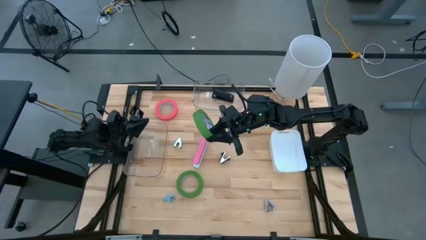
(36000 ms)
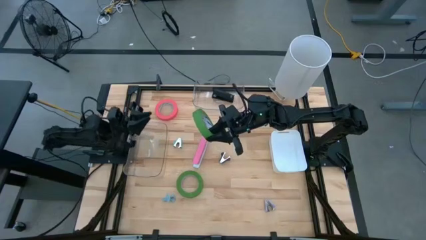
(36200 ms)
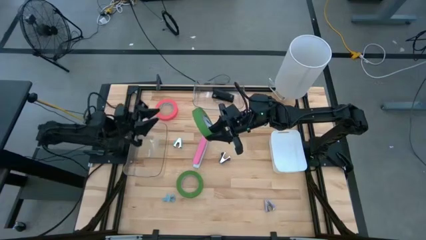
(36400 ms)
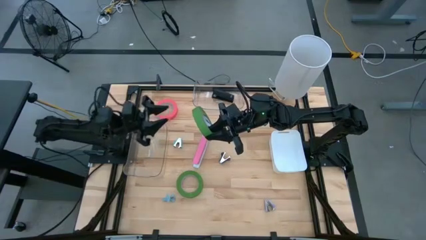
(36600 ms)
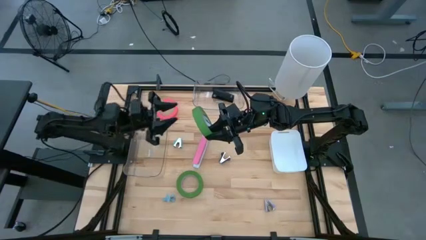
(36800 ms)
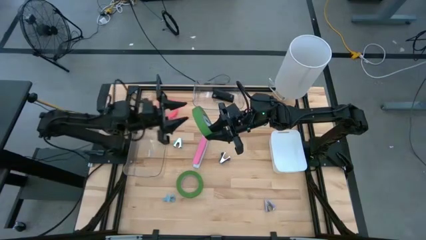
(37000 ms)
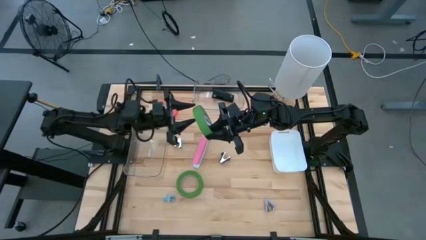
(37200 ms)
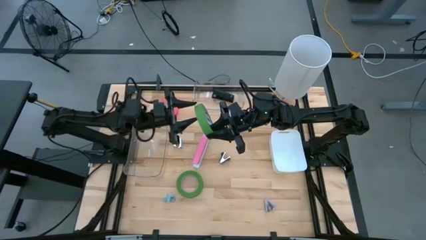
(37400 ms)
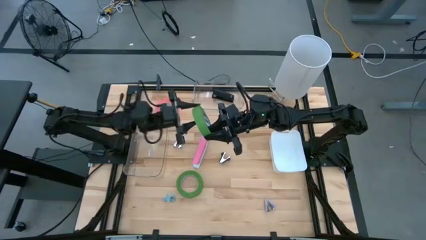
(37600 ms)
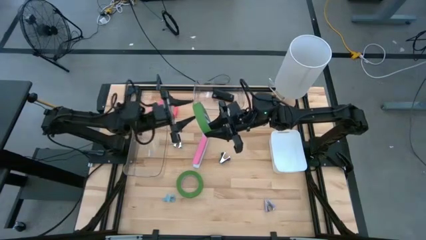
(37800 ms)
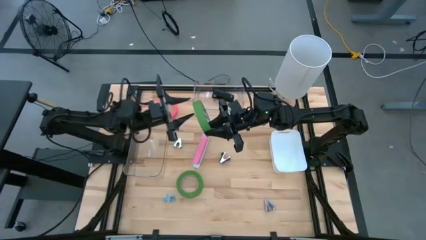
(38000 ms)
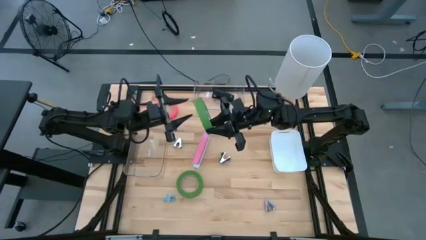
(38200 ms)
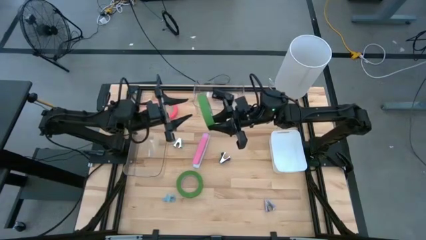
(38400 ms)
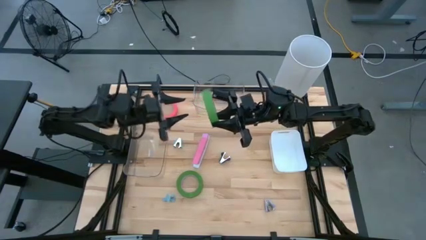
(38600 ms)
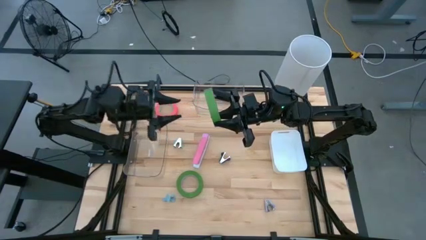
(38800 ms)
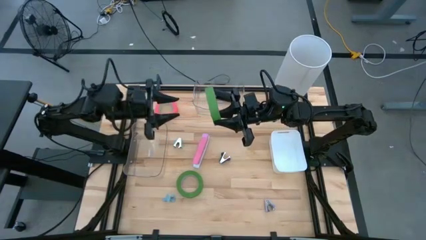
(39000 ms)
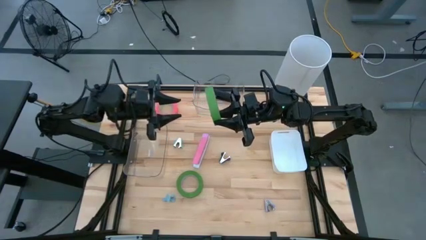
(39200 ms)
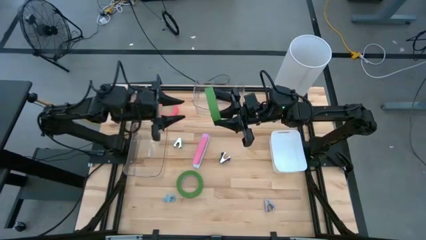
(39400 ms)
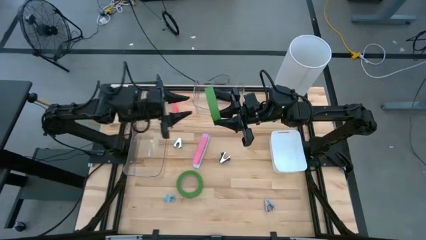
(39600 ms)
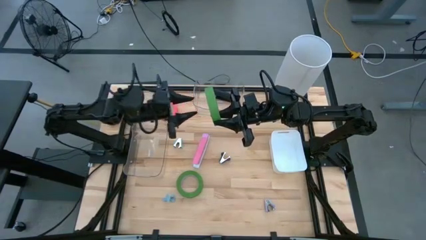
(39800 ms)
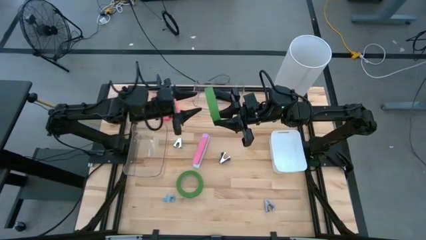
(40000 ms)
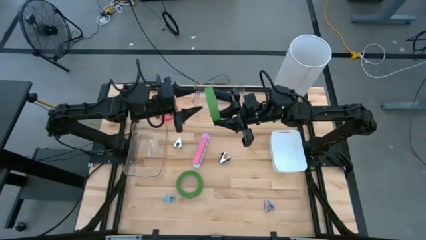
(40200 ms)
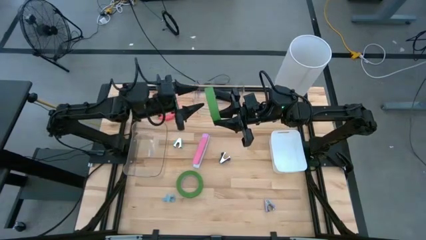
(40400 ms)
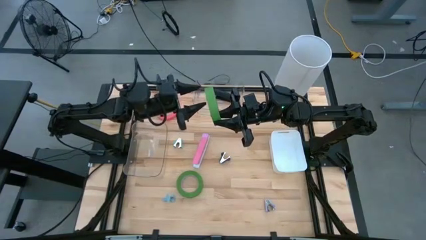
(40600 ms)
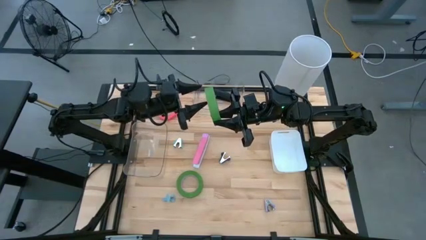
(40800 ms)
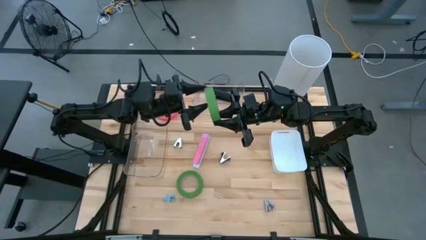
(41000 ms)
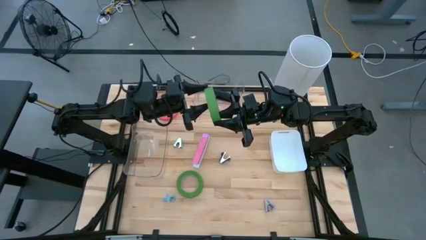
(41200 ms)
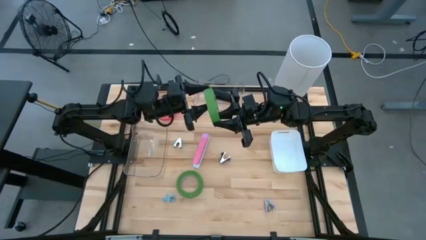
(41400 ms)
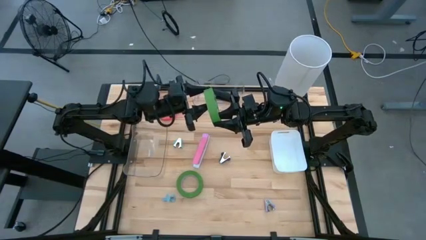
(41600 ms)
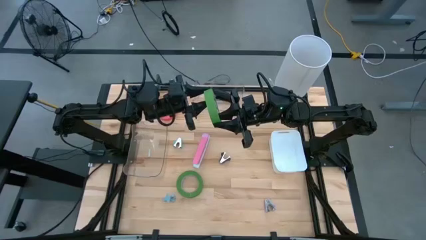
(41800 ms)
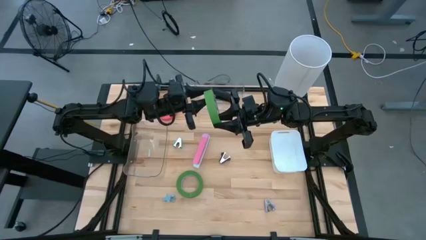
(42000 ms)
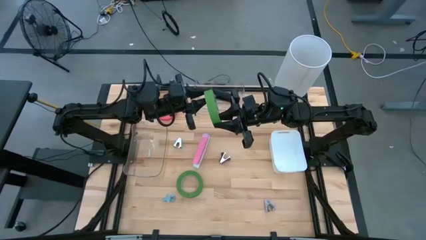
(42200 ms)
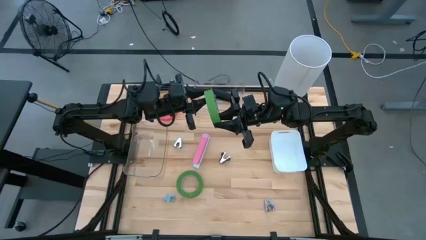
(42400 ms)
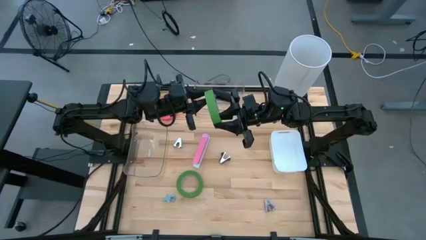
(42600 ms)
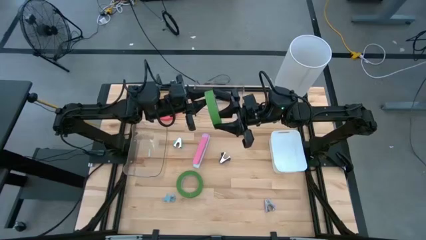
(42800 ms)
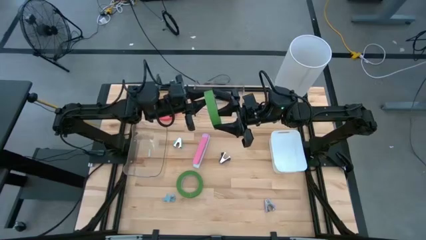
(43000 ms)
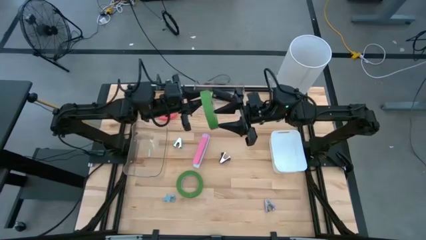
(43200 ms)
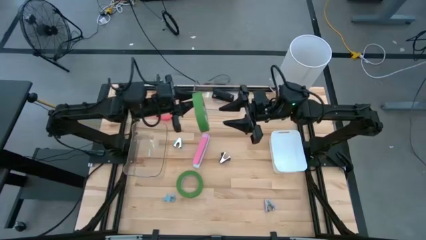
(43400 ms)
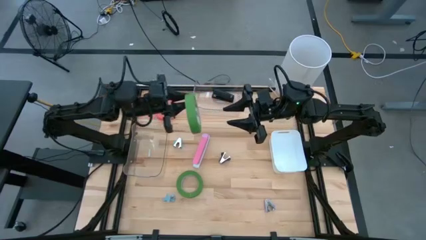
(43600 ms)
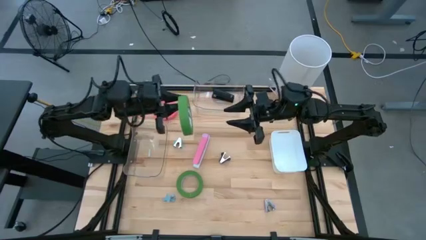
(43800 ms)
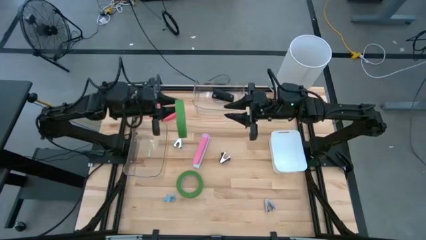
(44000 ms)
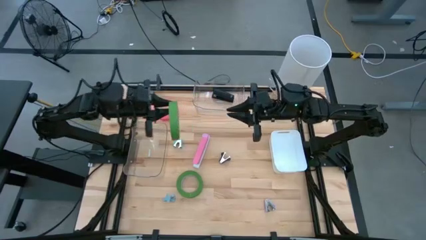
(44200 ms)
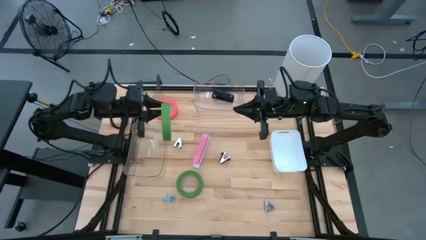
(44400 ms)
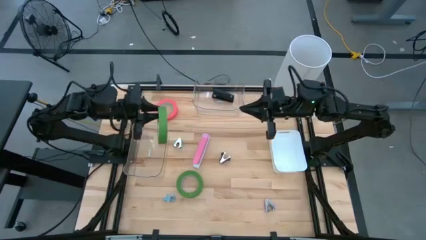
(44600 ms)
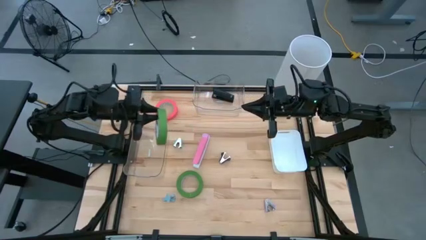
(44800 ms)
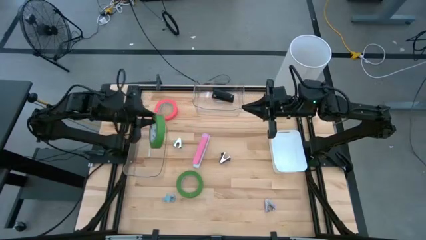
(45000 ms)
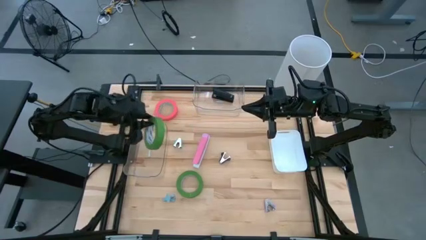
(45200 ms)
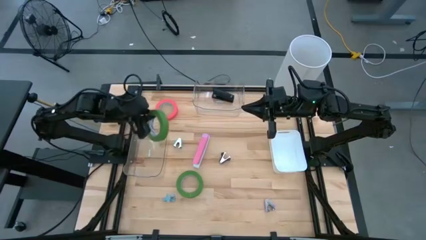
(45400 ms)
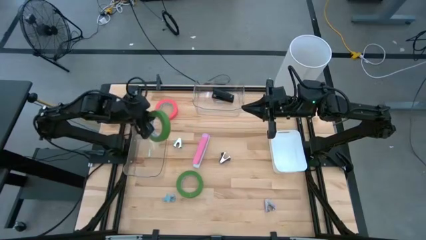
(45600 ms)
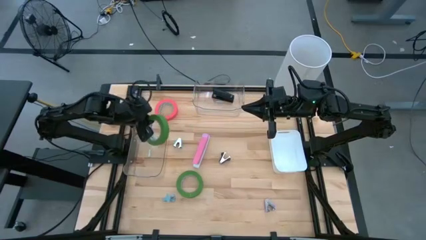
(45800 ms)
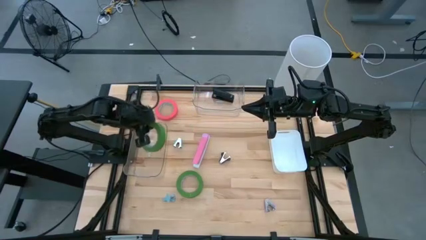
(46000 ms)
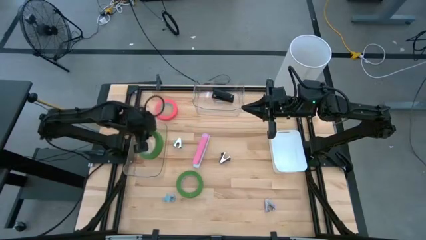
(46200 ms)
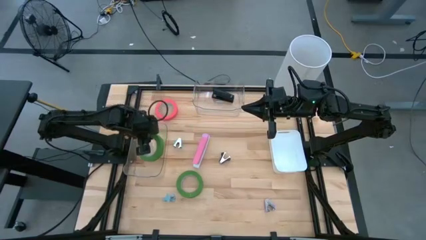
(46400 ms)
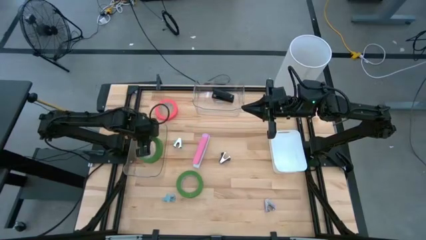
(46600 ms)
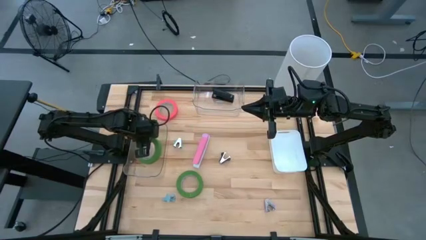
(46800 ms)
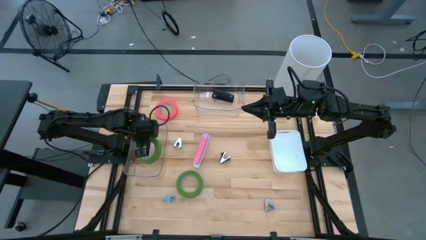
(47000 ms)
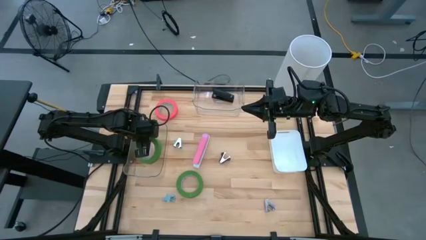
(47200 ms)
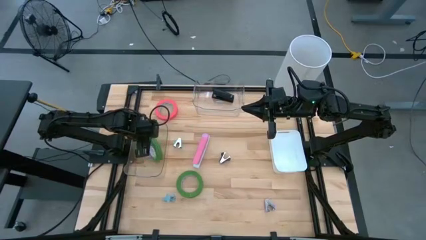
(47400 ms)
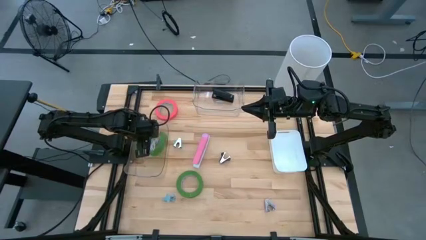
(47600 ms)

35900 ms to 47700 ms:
Task: Pick and place Stapler, Stapler remover, tape
Put the top green tape into the bottom transparent bin

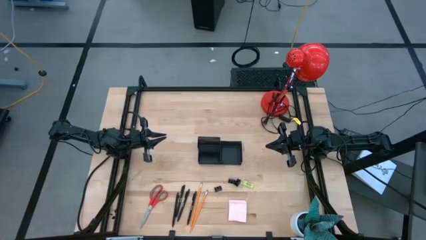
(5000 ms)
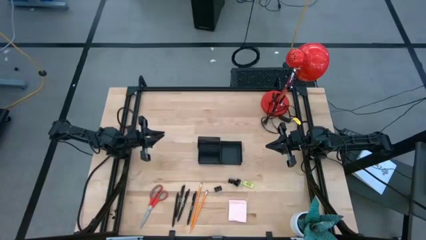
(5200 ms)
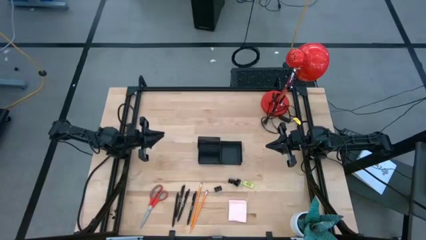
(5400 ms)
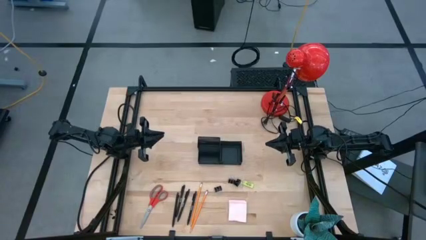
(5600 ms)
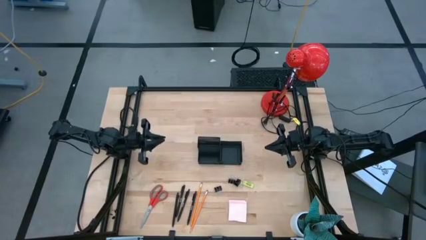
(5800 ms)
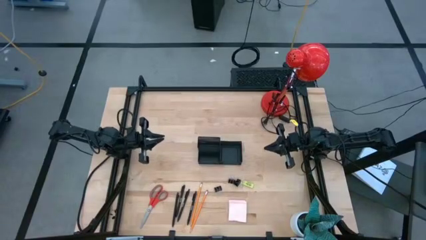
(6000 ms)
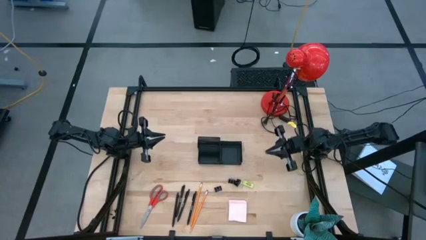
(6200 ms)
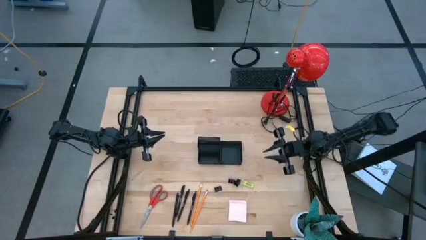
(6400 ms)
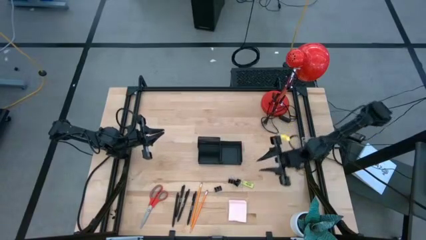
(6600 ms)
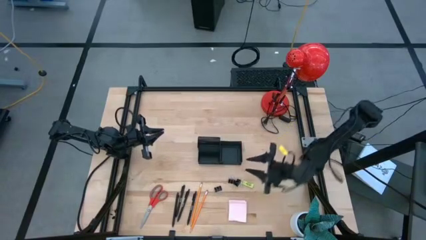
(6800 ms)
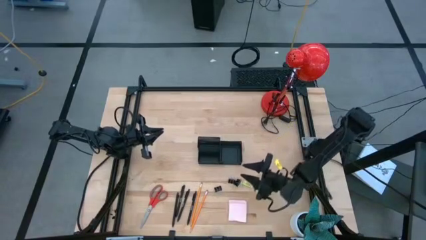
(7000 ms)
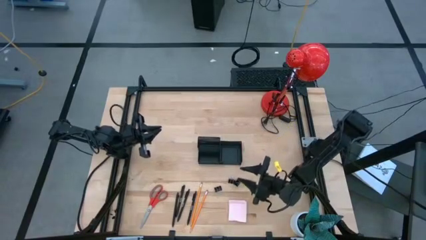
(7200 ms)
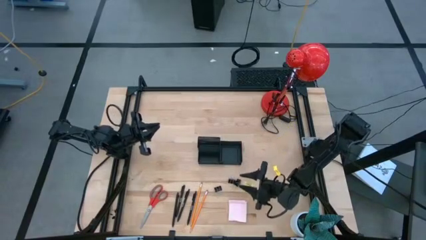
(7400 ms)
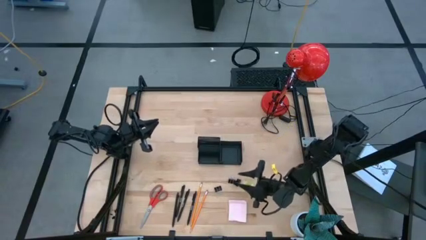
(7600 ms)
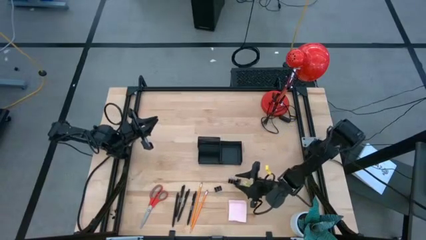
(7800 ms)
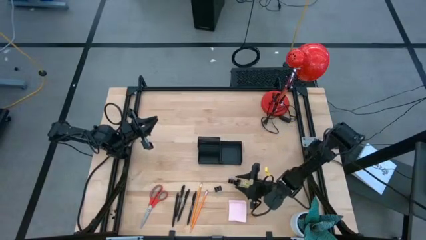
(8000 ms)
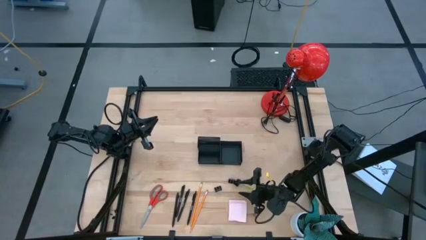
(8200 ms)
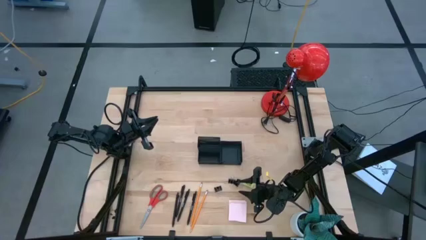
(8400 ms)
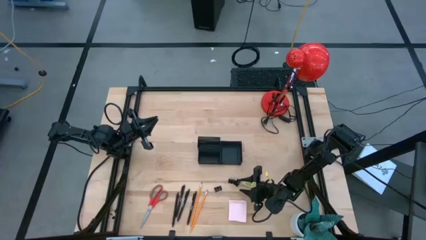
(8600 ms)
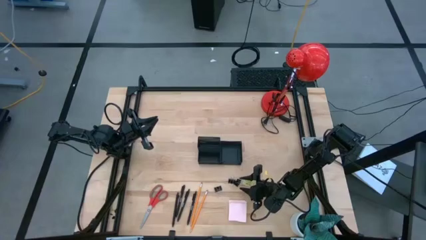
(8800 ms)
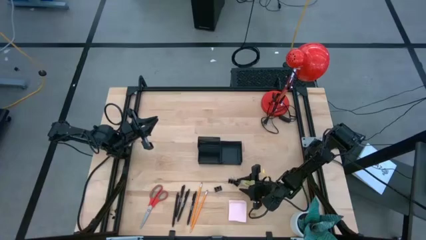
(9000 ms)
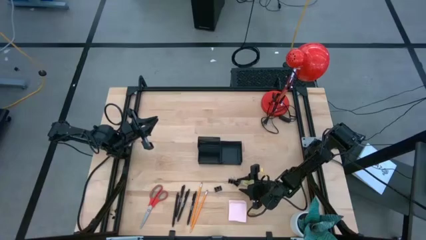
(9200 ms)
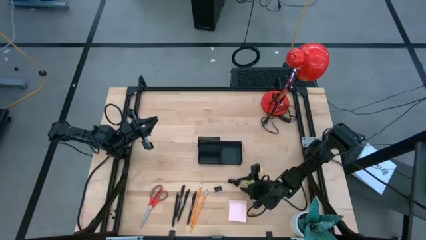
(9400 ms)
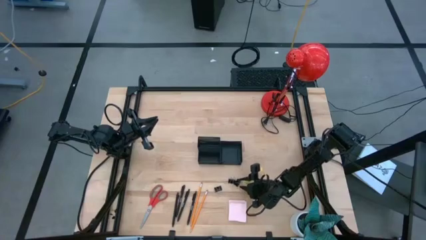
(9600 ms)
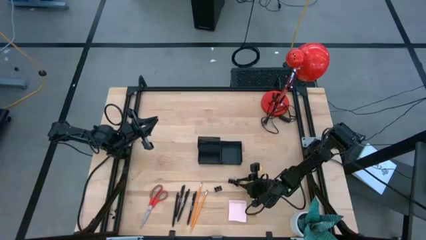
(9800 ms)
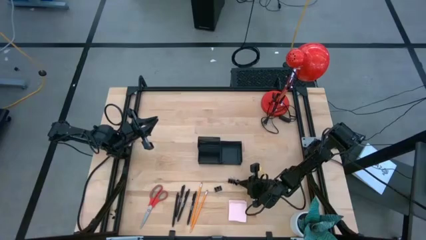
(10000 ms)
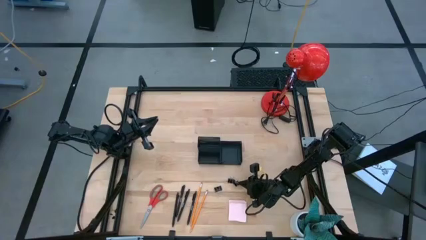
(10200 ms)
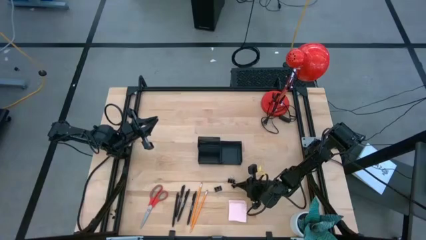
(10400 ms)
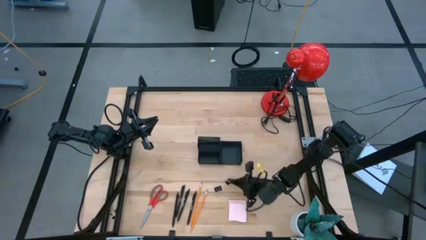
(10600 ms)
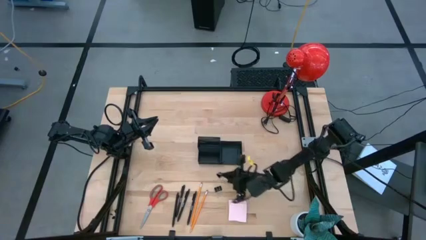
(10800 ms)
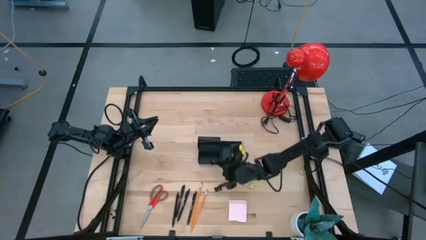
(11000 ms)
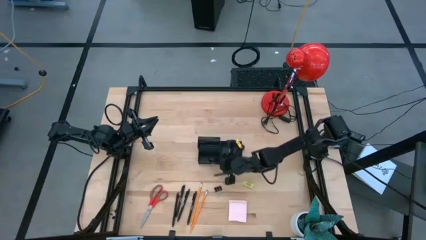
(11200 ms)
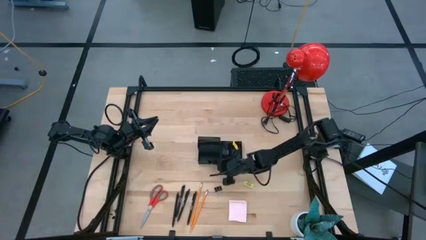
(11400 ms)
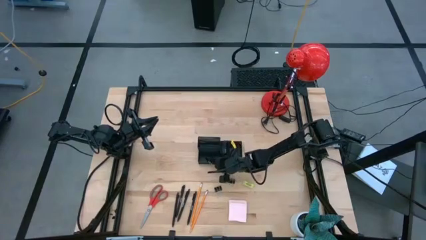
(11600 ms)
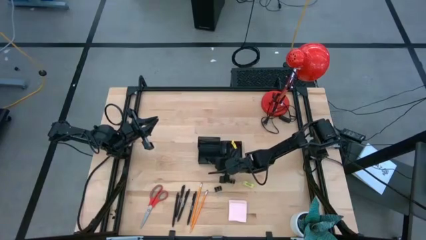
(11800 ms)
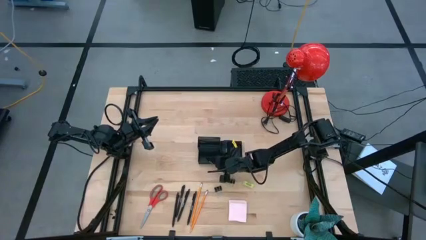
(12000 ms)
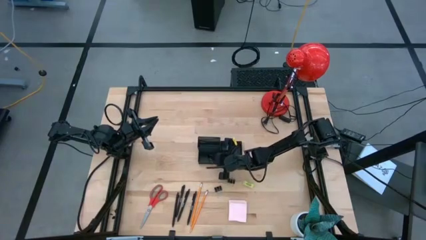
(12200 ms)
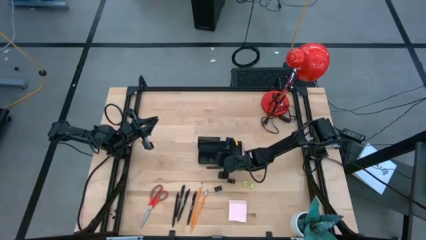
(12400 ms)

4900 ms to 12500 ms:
Task: Pick and place office supplies into organizer
Put the black binder clip into the black desk organizer
